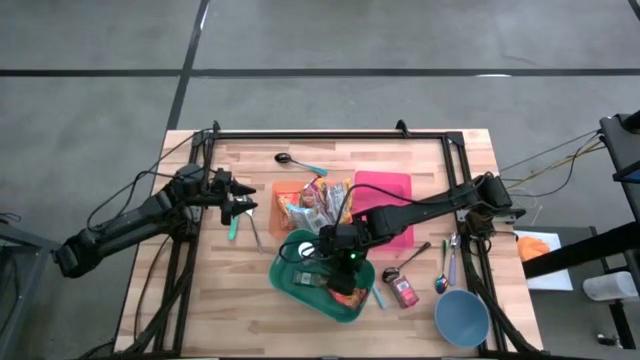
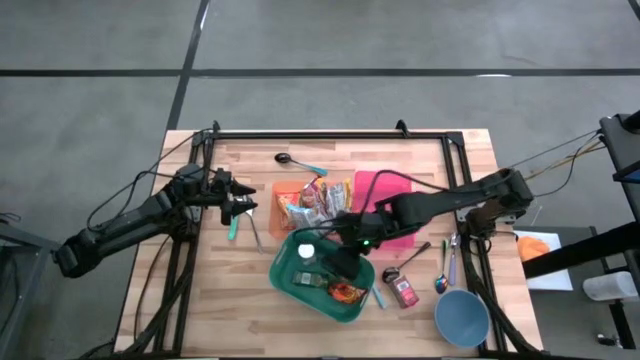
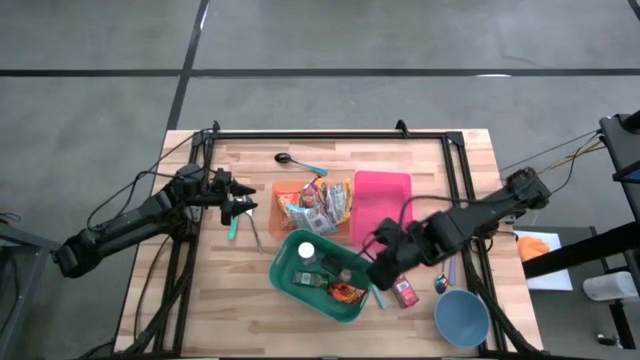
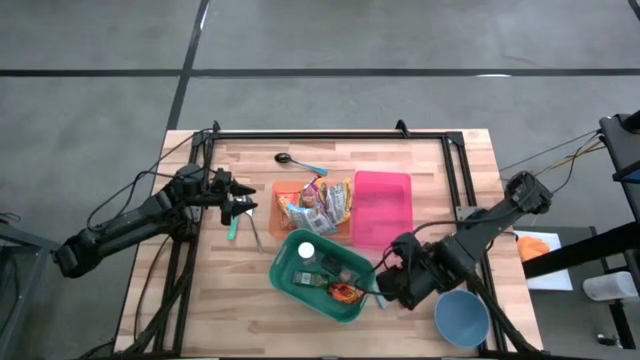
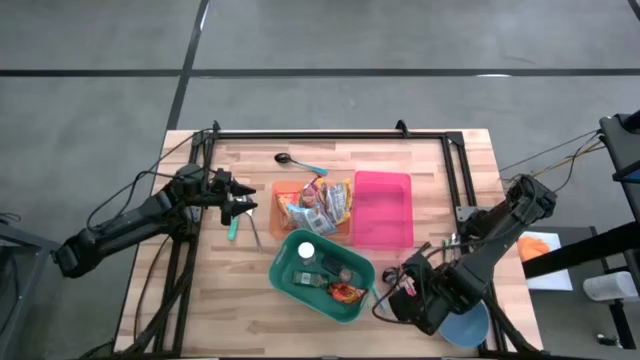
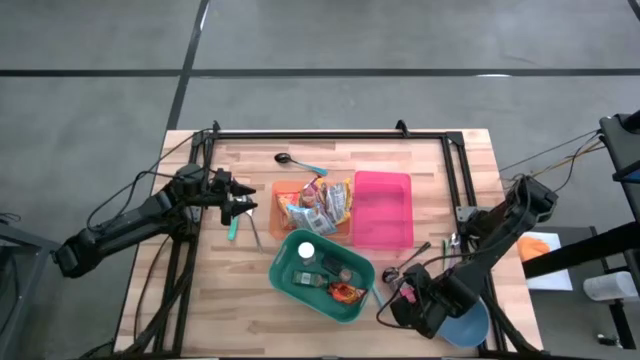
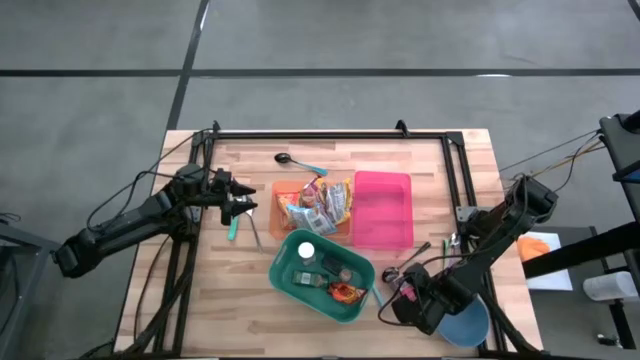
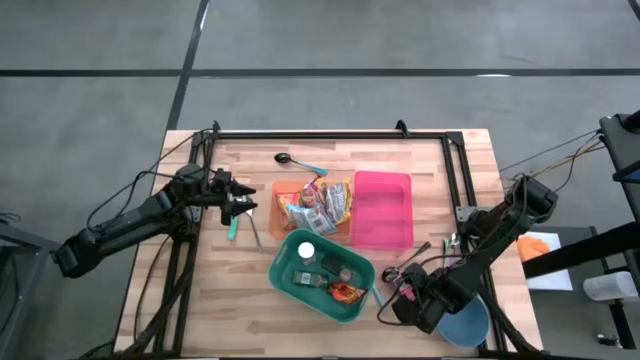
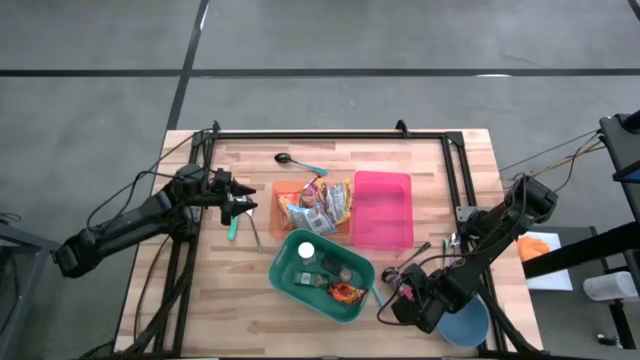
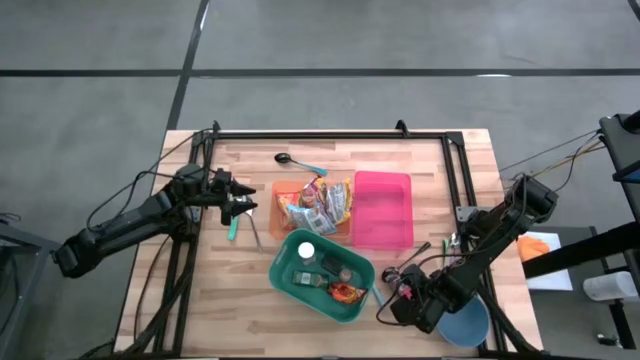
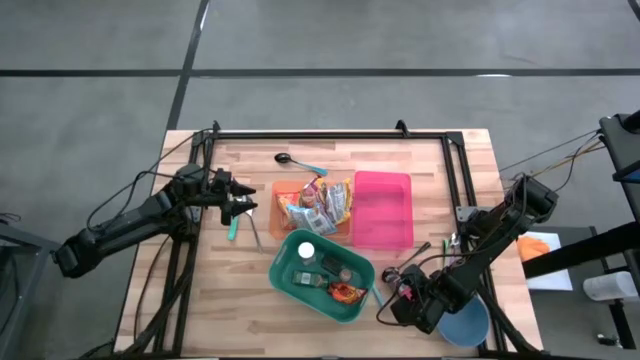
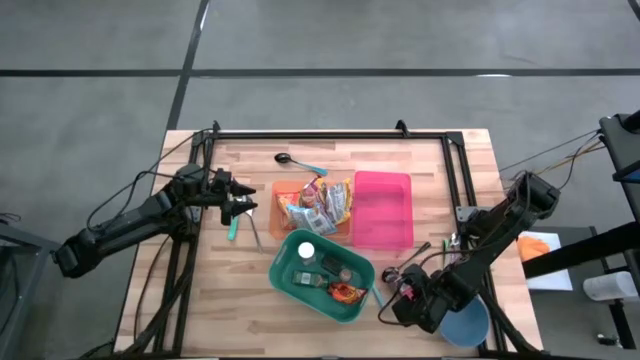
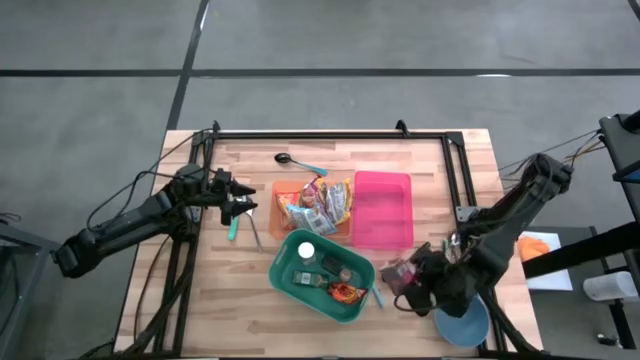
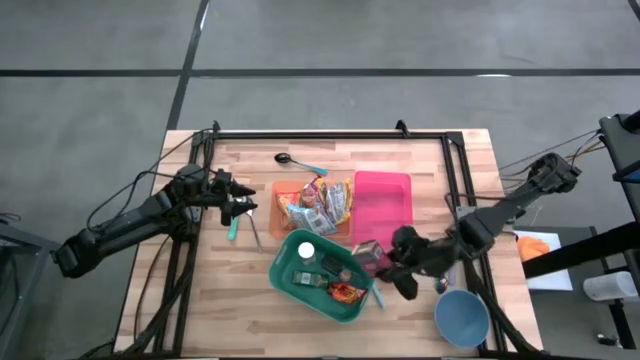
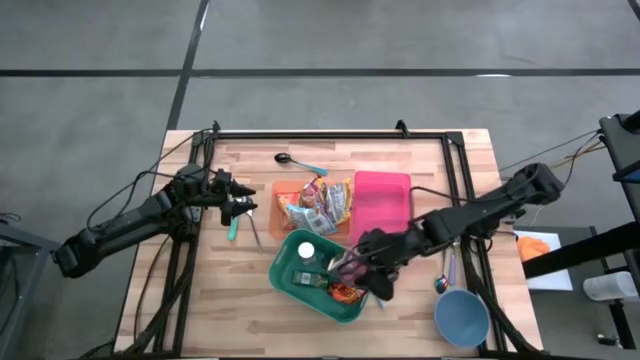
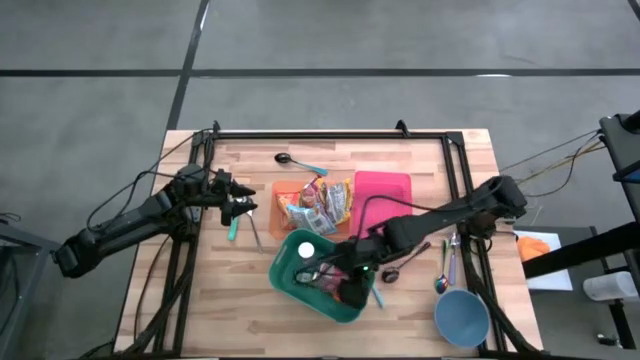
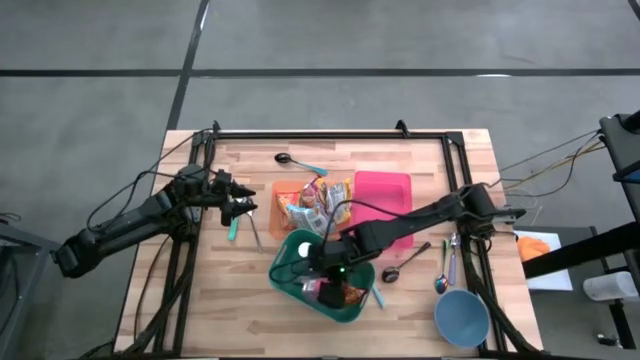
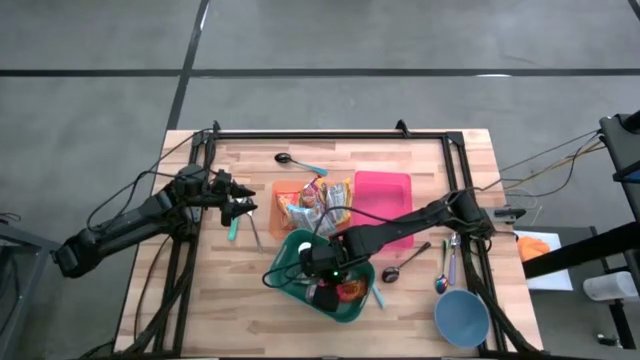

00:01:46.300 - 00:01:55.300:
Put the red seasoning can into the green bin

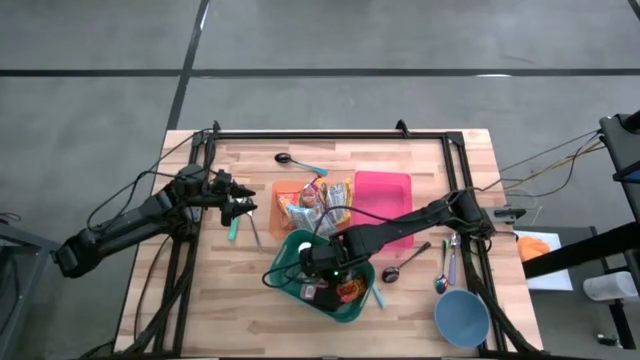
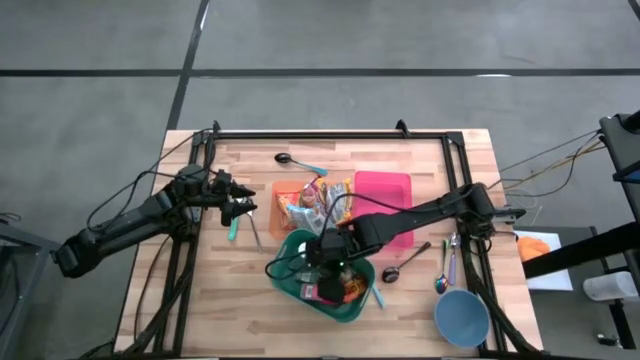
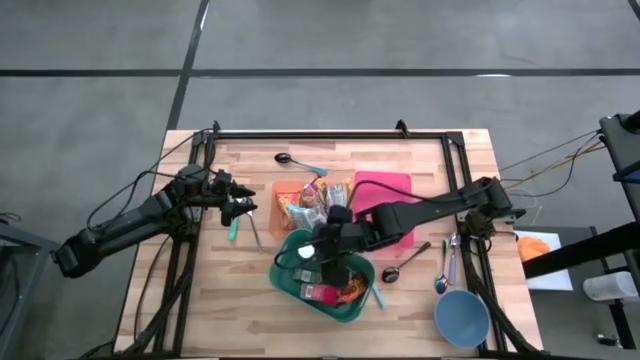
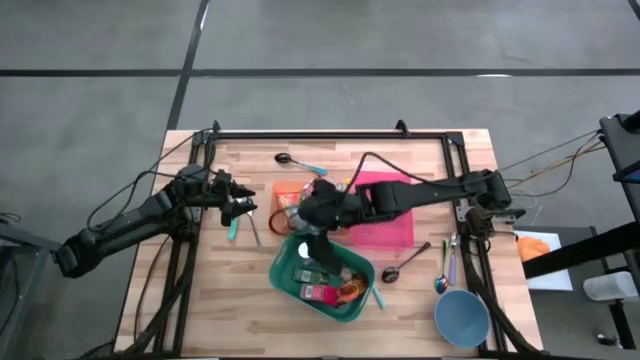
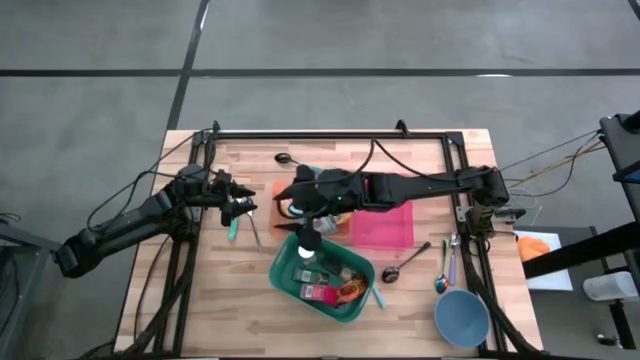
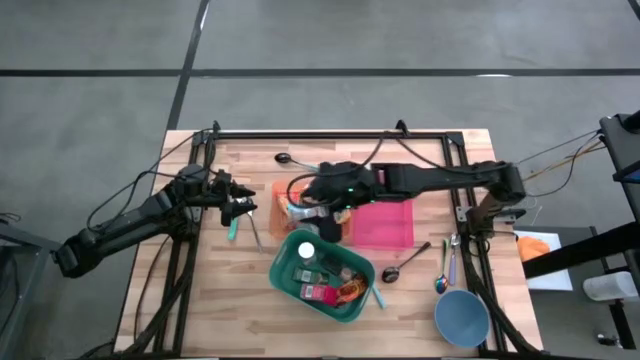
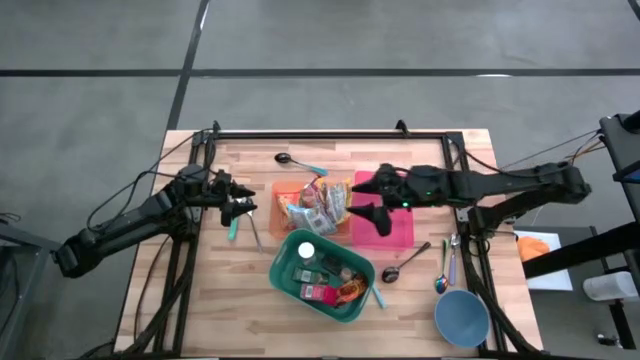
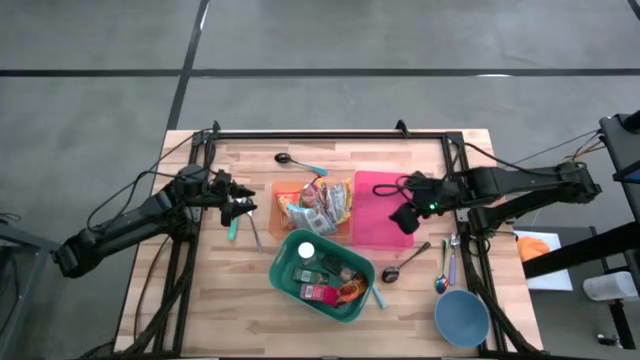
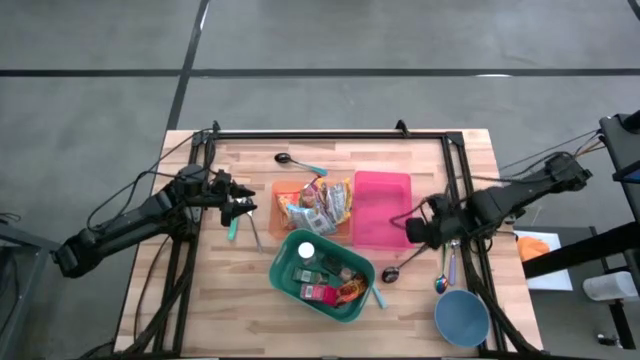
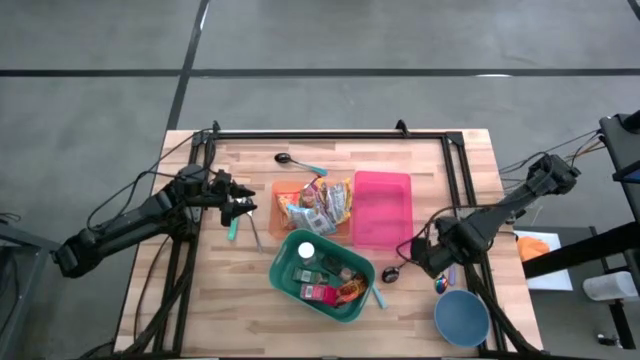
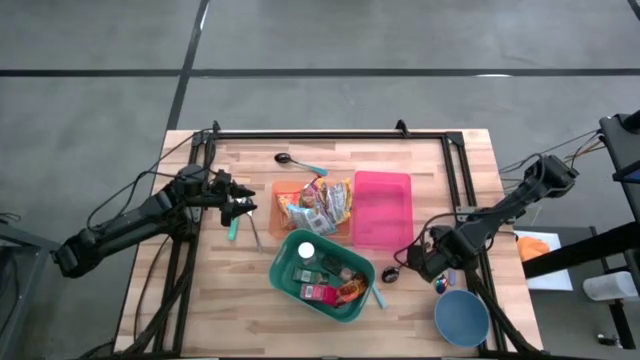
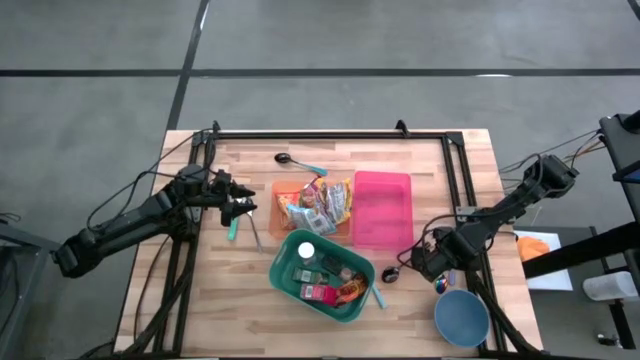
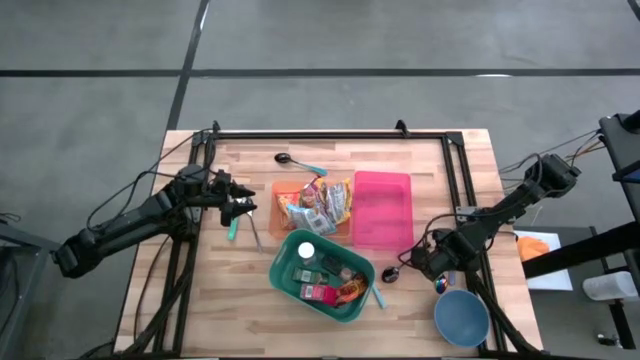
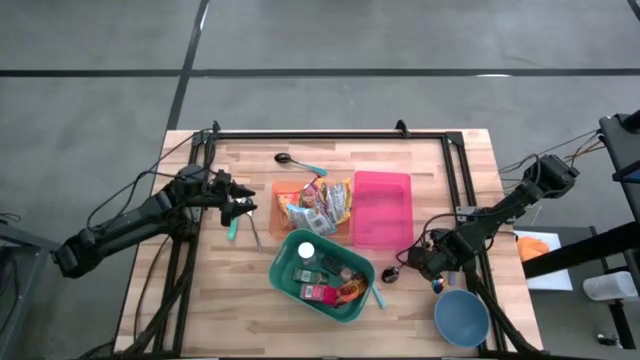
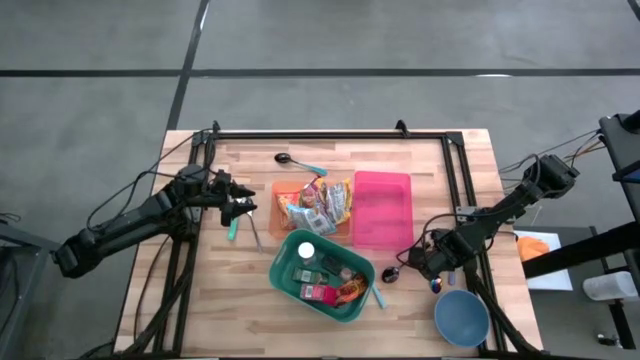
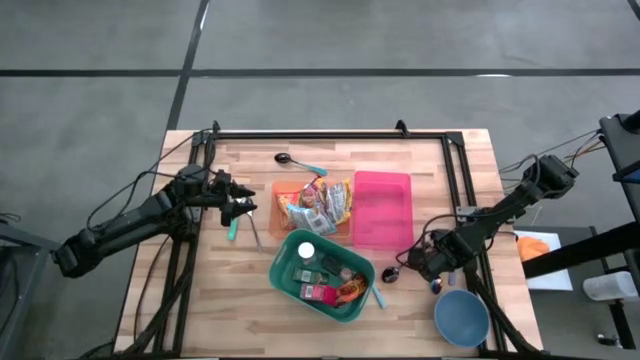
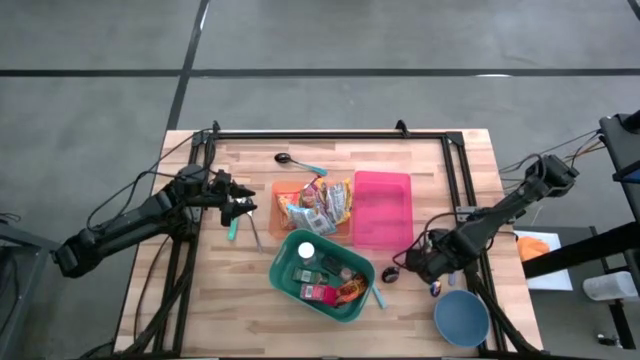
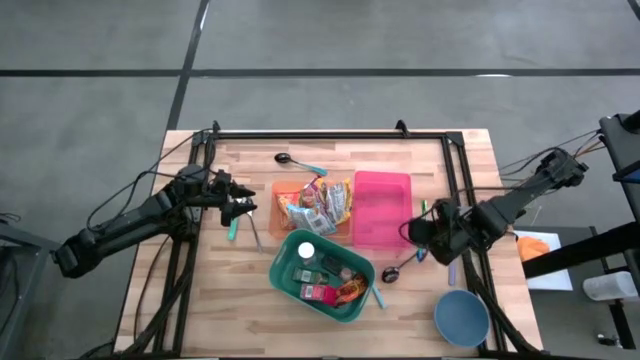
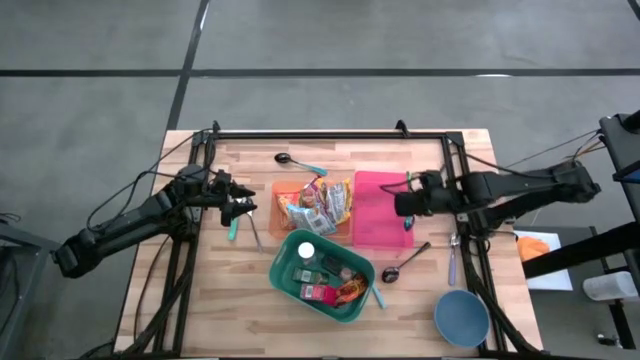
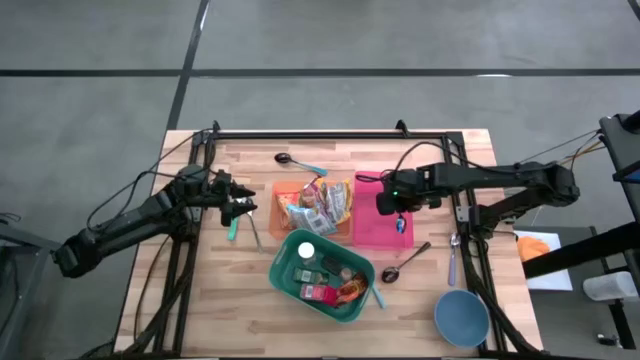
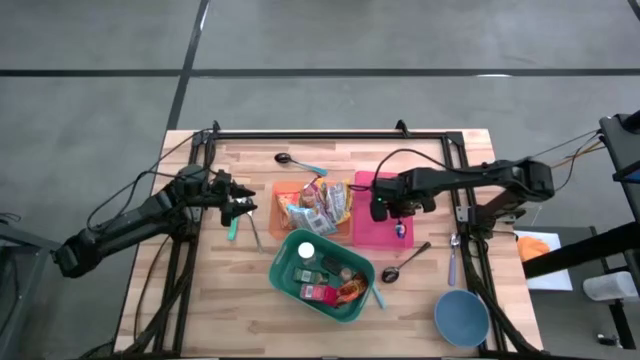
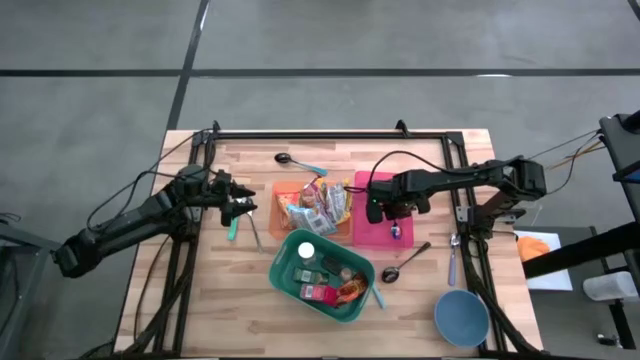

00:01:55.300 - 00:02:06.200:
Put the purple and blue spoon into the pink bin
